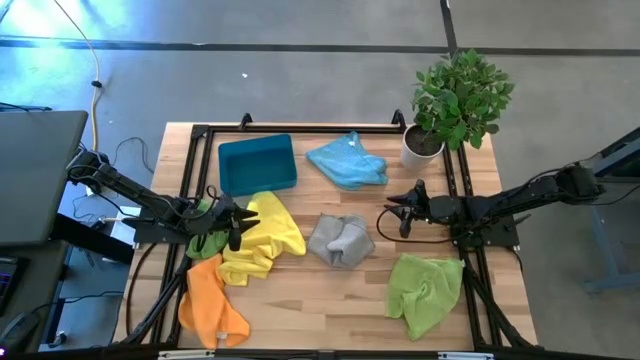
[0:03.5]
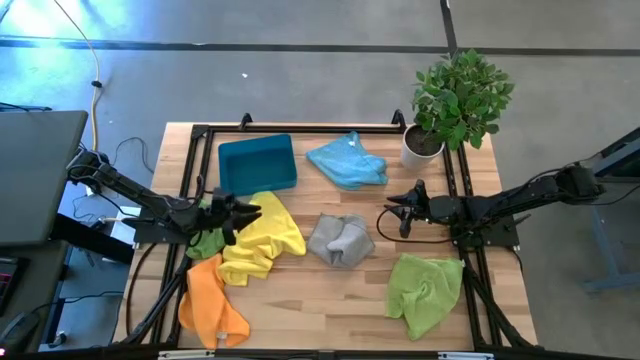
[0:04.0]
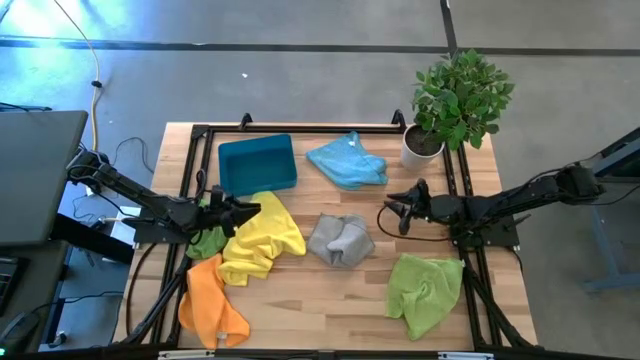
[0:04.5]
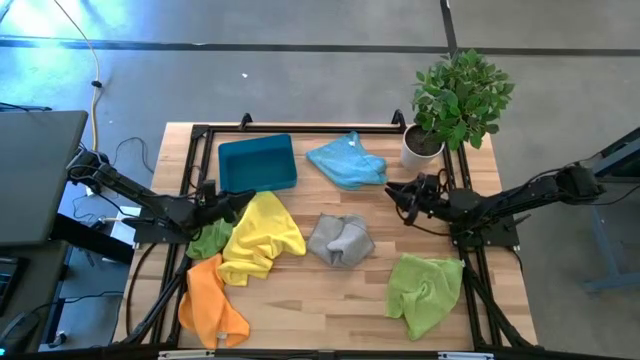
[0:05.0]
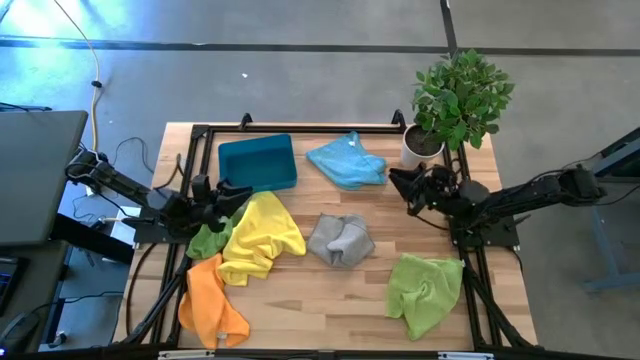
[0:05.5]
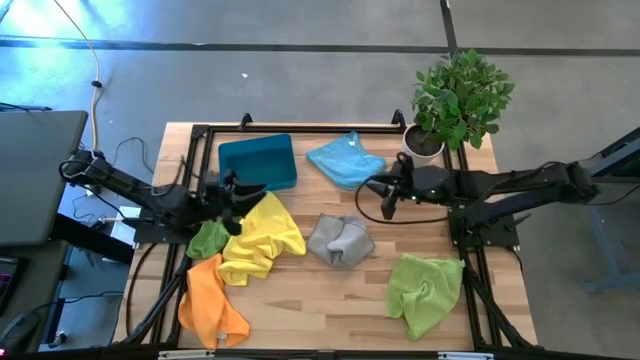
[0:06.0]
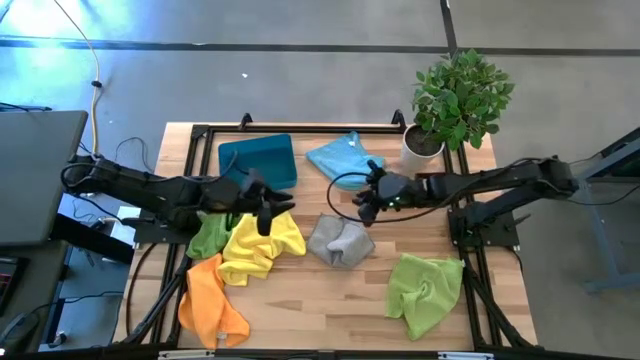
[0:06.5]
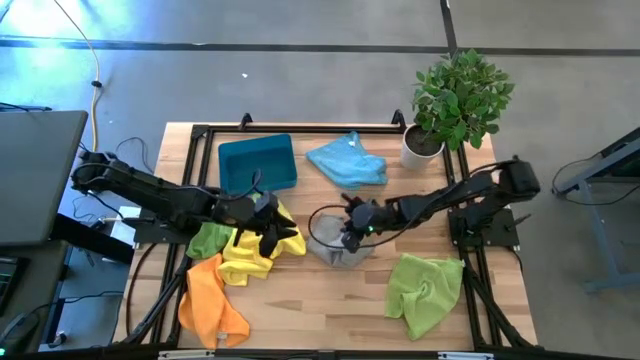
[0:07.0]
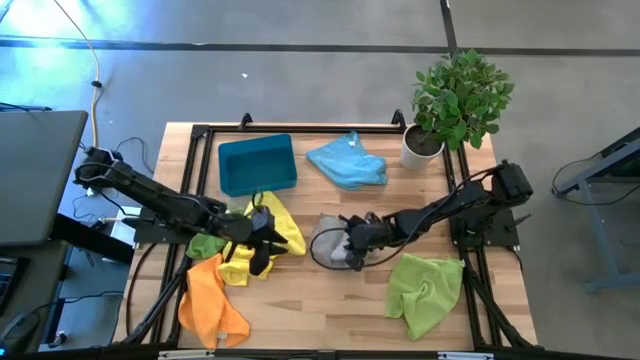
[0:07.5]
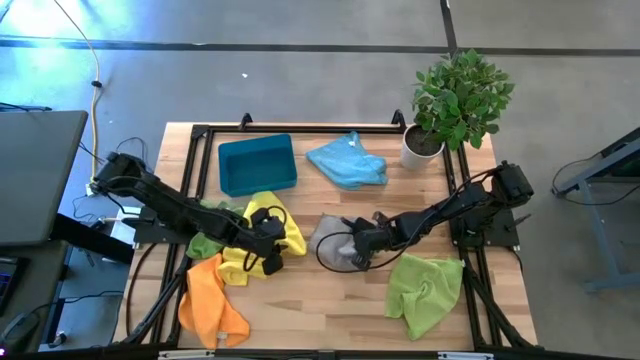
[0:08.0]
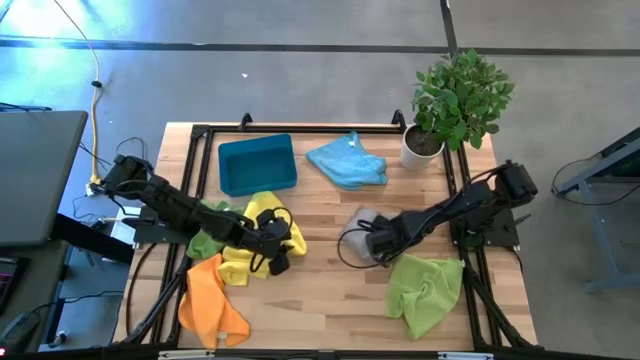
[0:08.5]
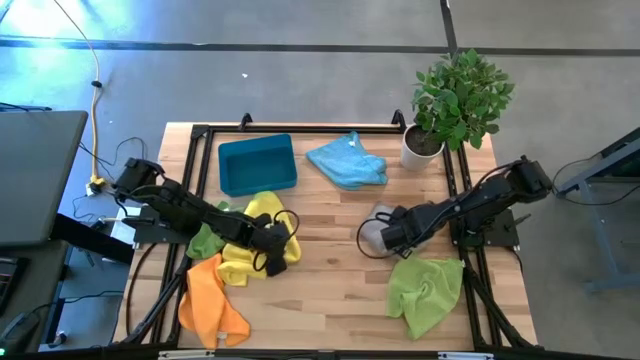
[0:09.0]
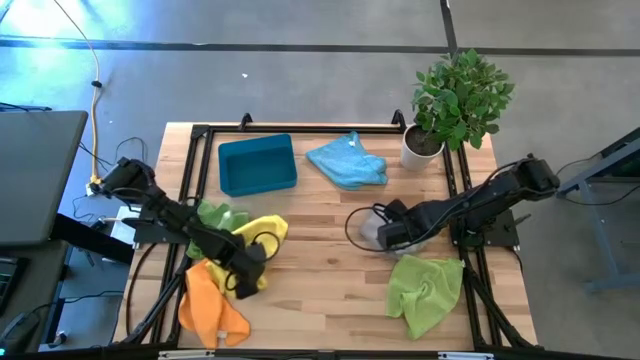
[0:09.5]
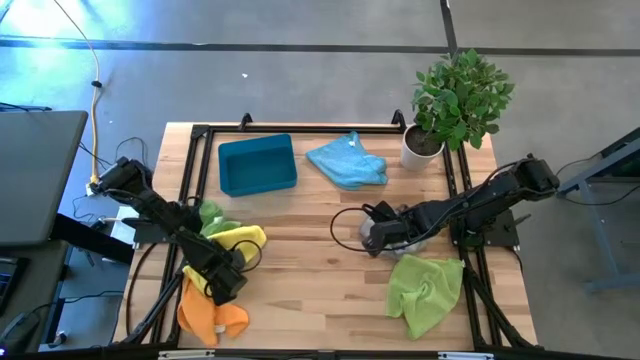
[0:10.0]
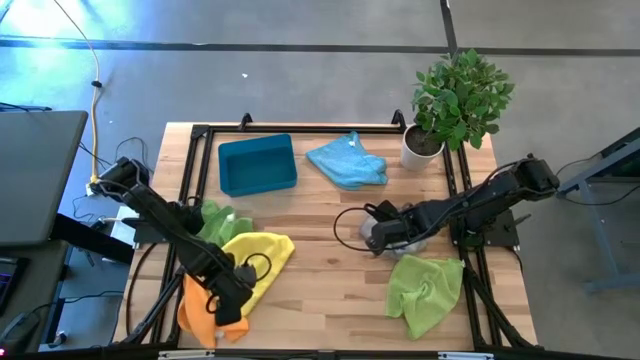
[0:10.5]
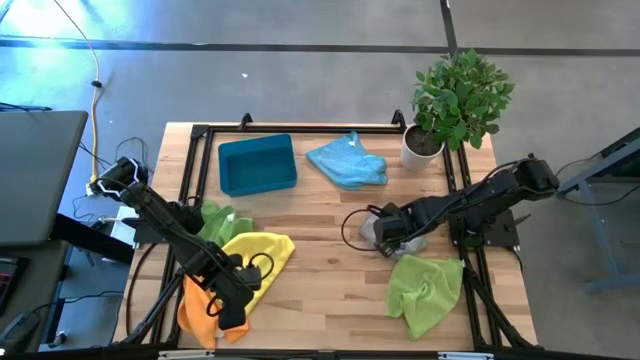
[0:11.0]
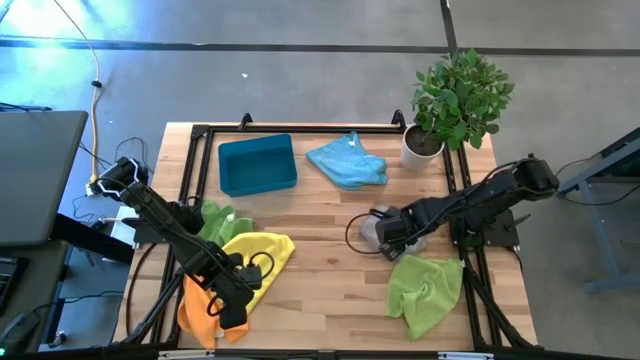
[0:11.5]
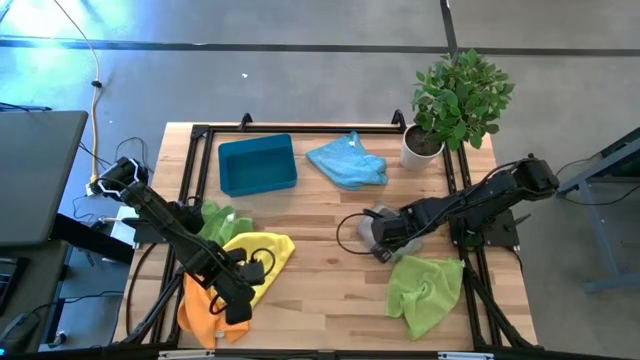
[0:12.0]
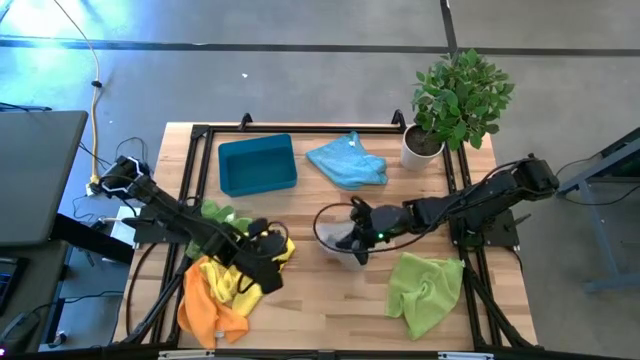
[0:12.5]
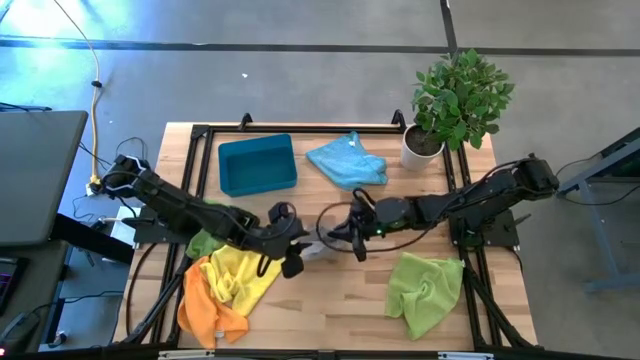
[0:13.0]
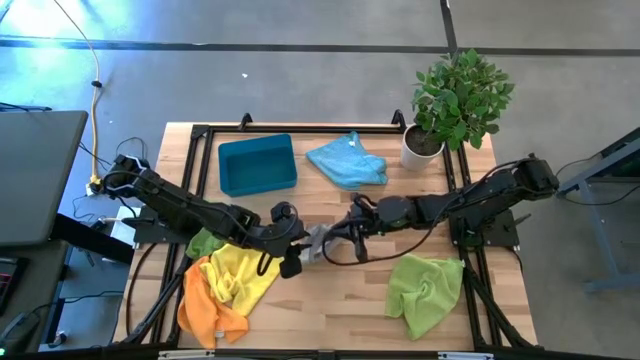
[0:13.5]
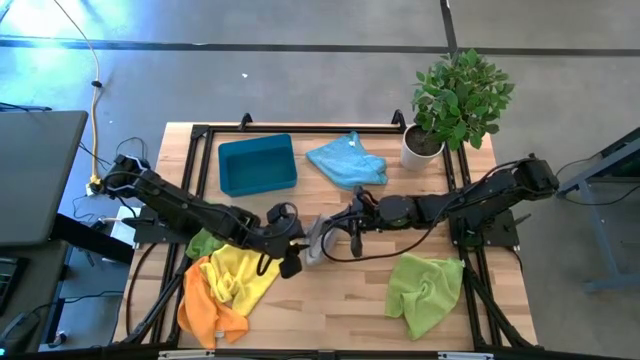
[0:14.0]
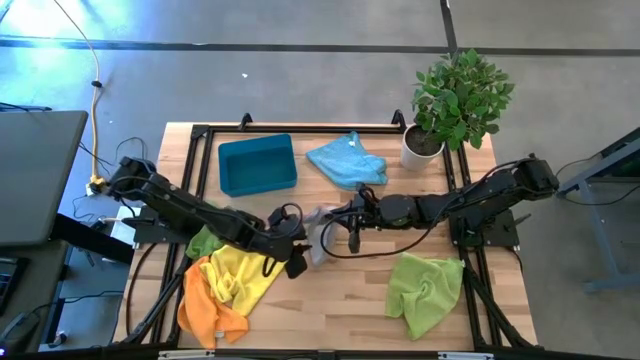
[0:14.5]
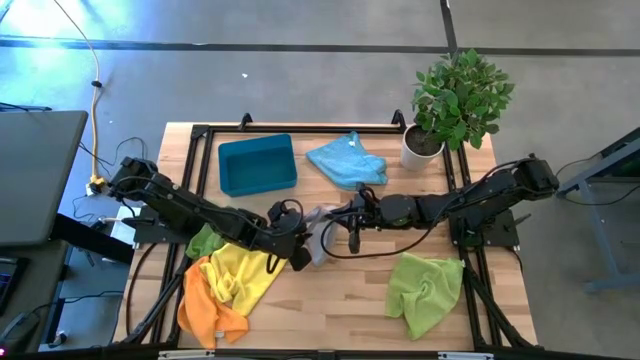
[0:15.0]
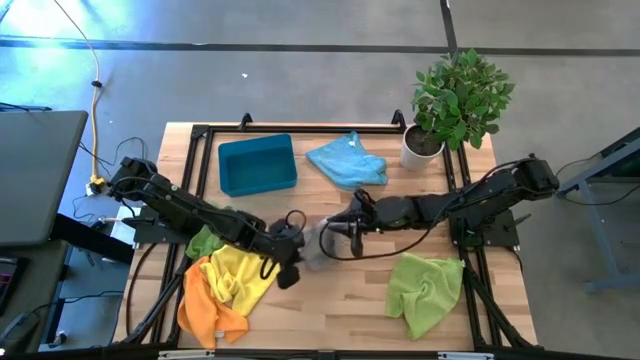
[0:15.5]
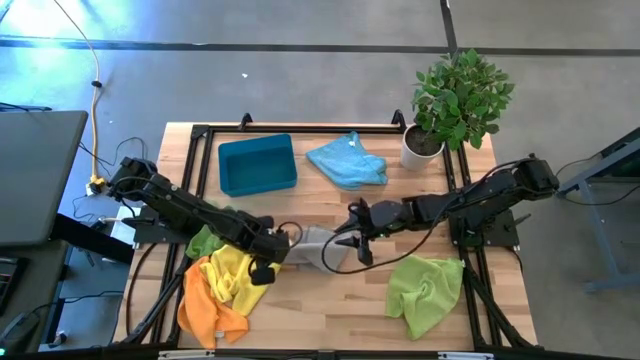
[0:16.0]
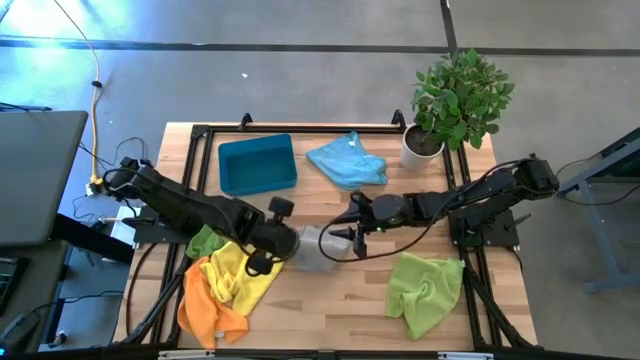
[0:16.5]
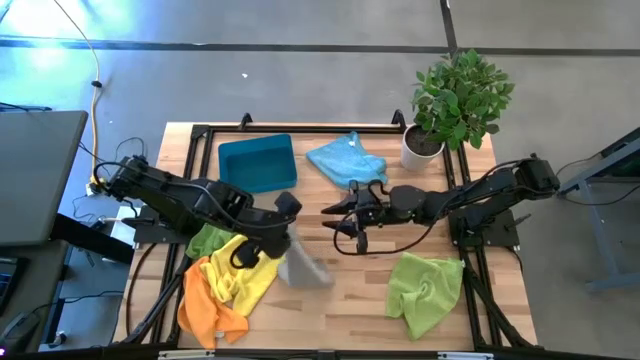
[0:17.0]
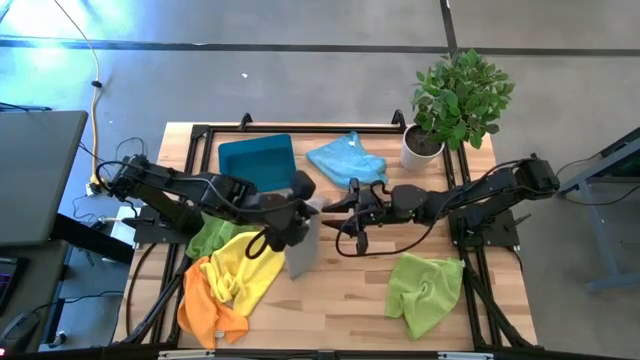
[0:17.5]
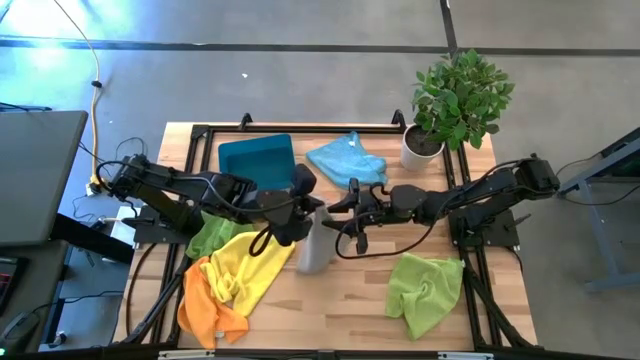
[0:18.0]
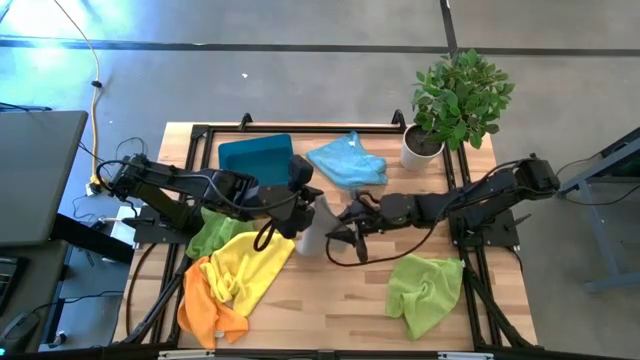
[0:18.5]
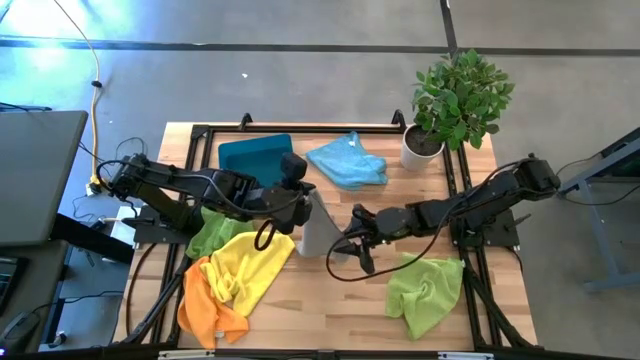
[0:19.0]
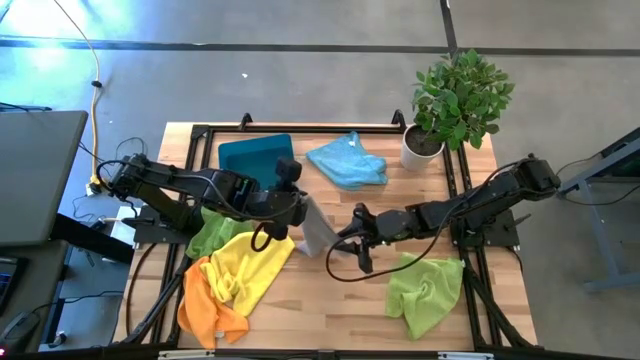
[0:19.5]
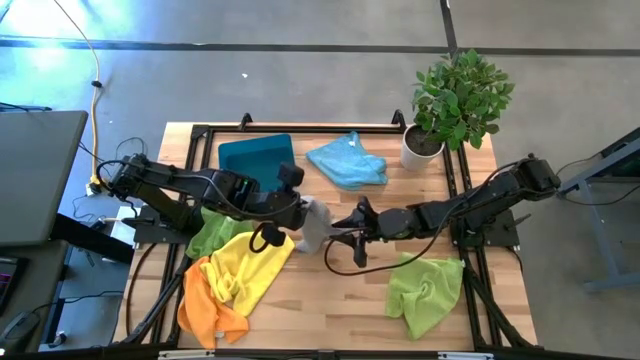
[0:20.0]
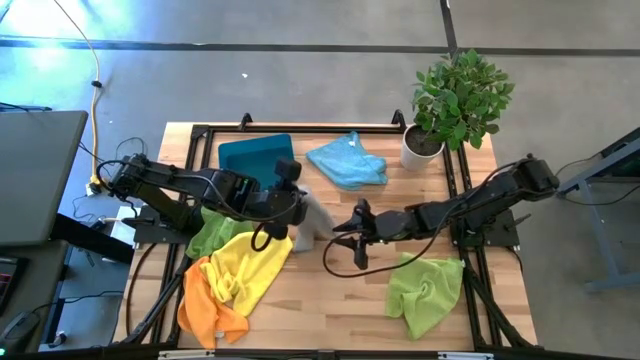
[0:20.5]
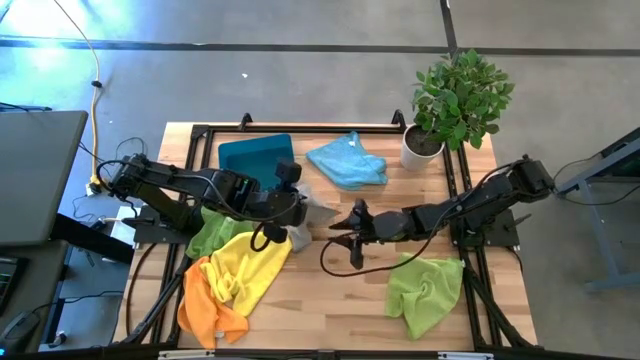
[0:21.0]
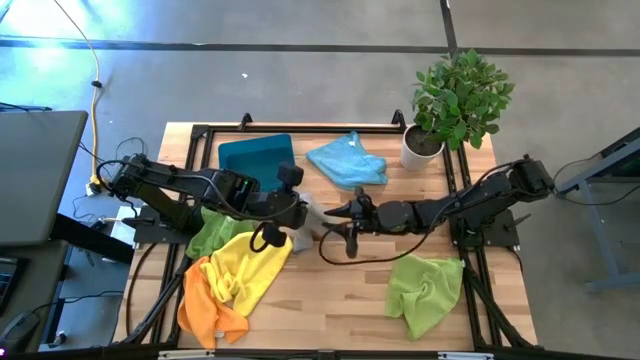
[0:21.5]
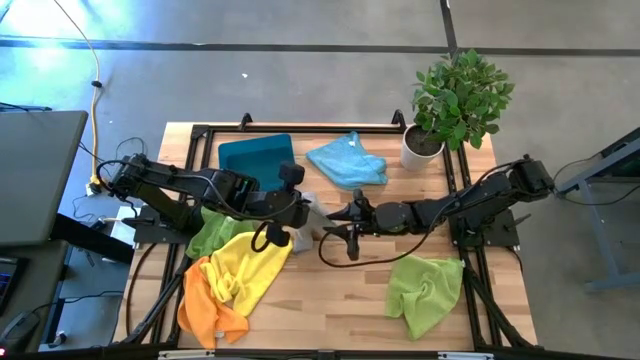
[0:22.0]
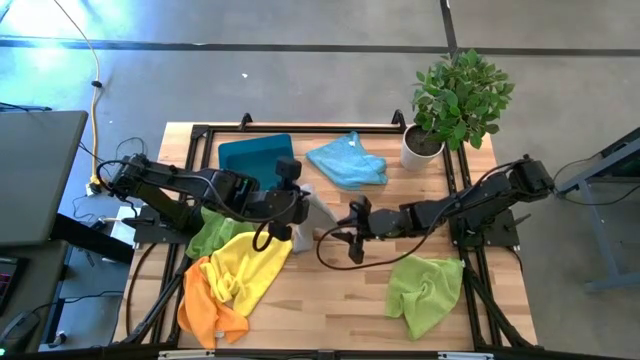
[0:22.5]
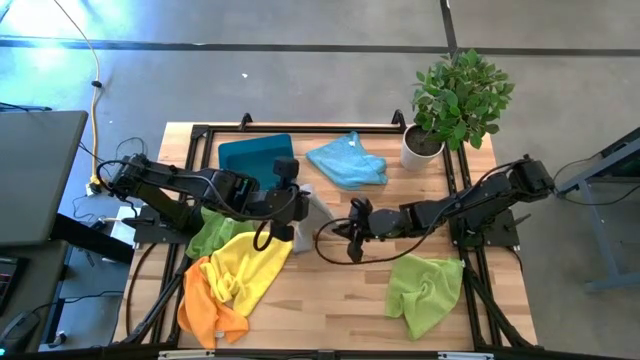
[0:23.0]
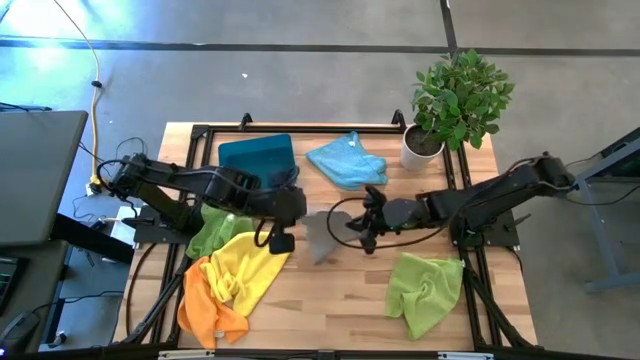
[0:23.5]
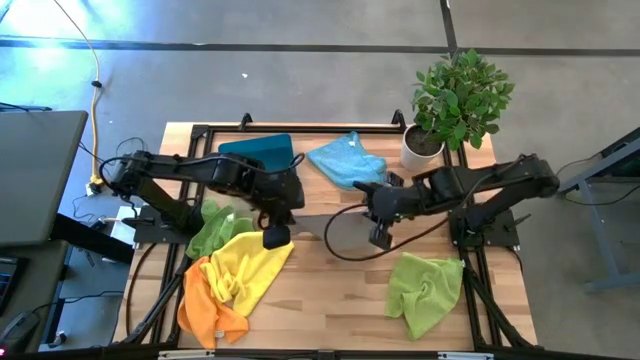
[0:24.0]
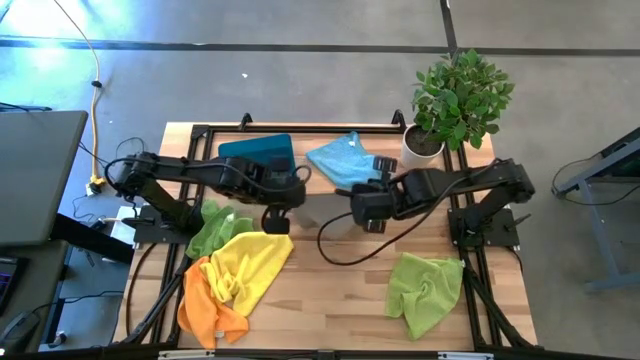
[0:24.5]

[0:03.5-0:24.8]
Task: Fold microfiber towels
Fold the gray microfiber cloth
